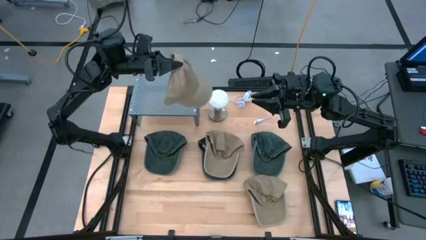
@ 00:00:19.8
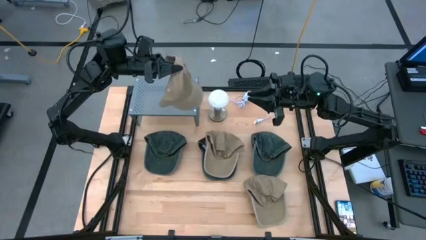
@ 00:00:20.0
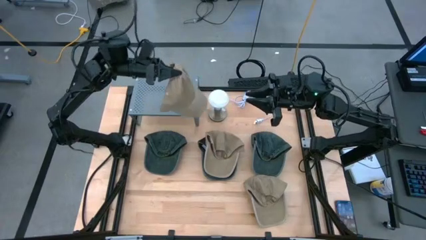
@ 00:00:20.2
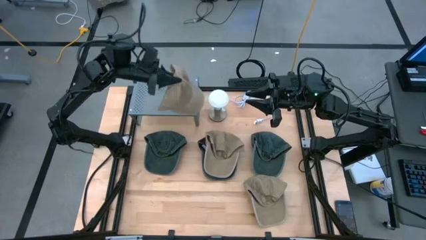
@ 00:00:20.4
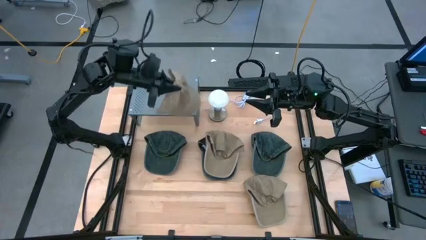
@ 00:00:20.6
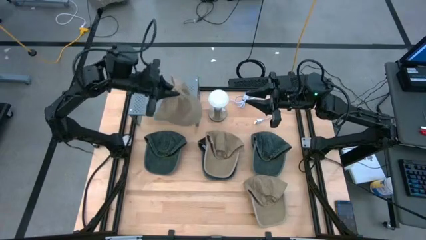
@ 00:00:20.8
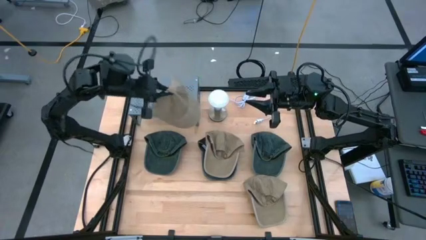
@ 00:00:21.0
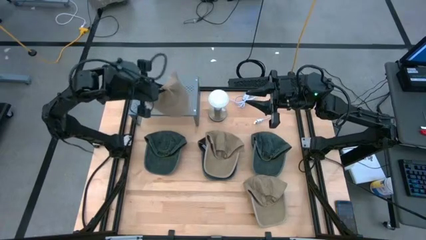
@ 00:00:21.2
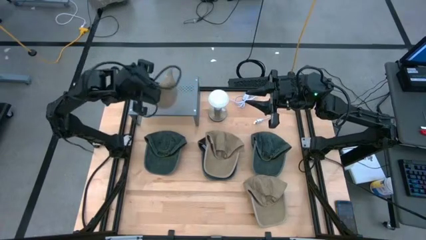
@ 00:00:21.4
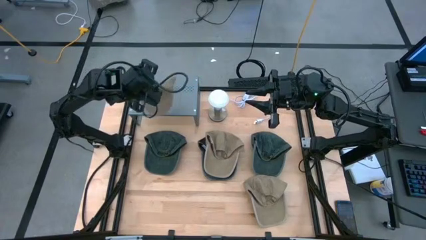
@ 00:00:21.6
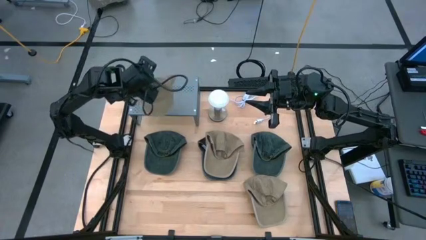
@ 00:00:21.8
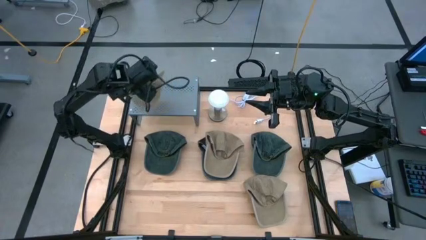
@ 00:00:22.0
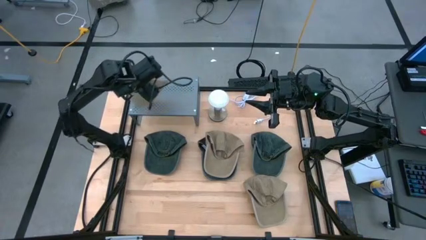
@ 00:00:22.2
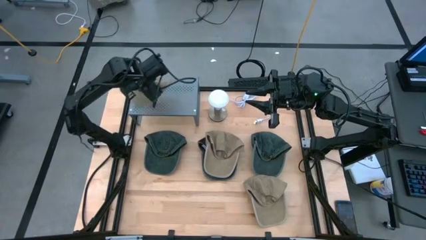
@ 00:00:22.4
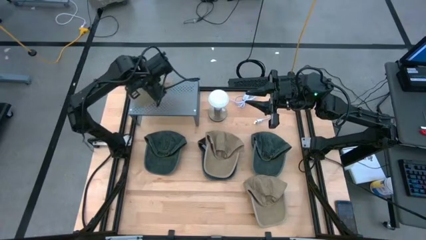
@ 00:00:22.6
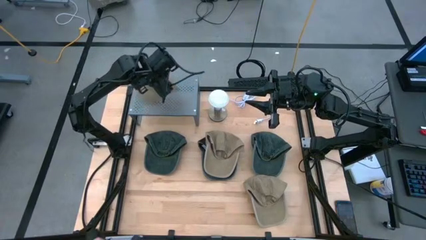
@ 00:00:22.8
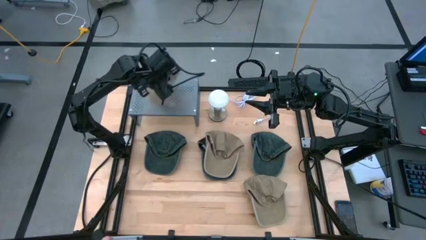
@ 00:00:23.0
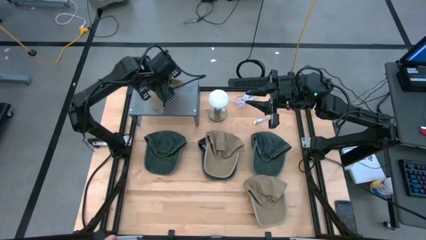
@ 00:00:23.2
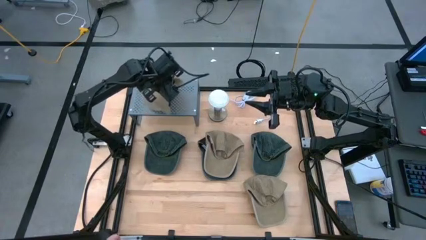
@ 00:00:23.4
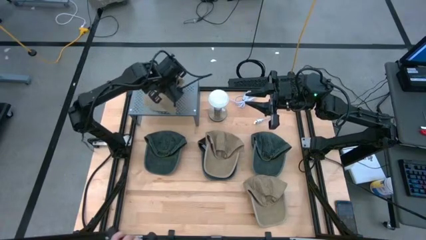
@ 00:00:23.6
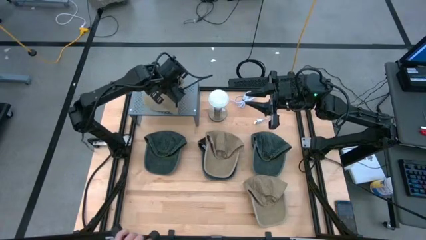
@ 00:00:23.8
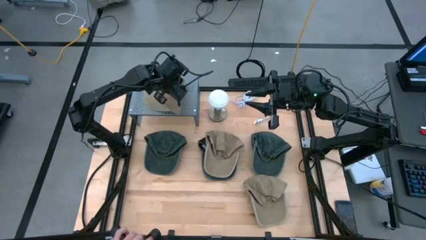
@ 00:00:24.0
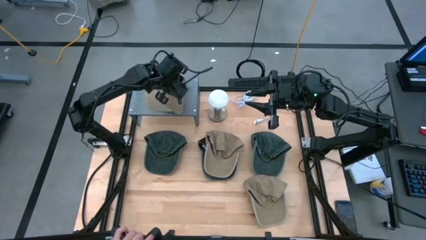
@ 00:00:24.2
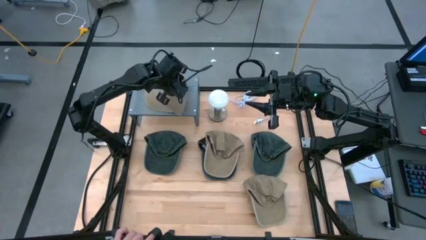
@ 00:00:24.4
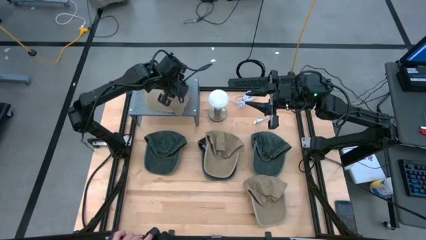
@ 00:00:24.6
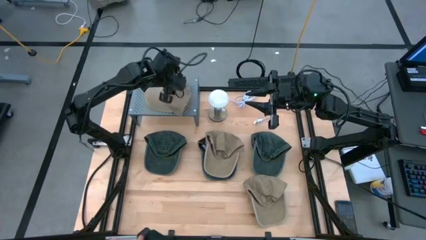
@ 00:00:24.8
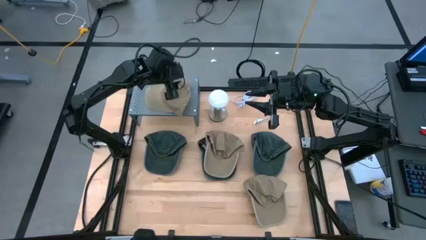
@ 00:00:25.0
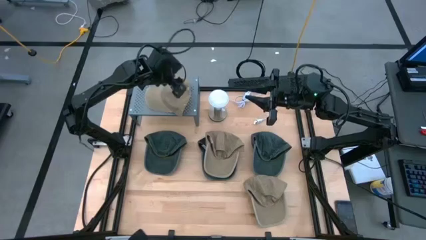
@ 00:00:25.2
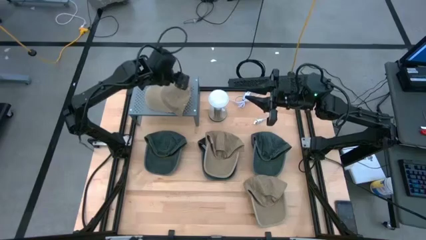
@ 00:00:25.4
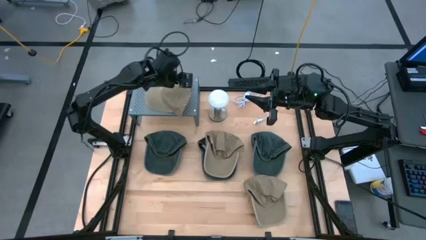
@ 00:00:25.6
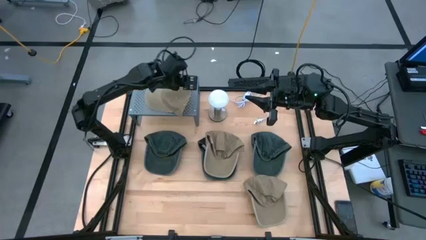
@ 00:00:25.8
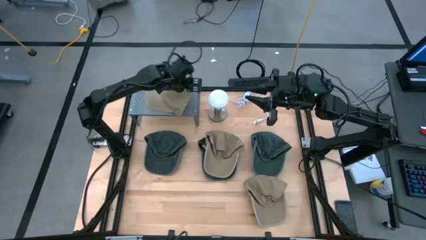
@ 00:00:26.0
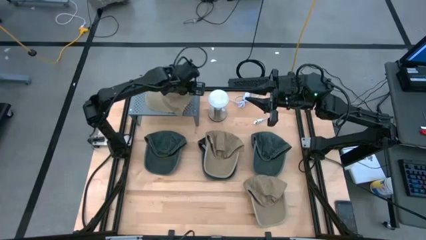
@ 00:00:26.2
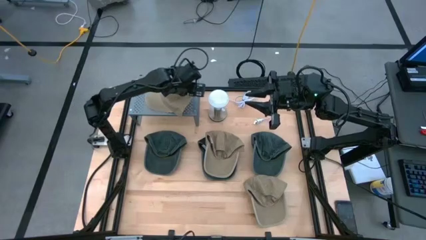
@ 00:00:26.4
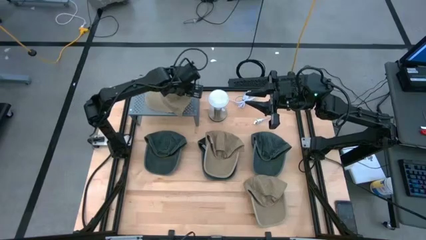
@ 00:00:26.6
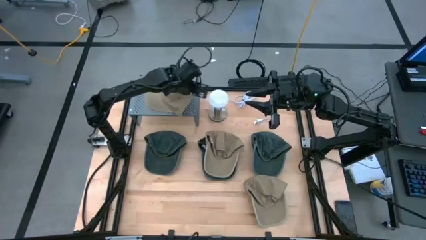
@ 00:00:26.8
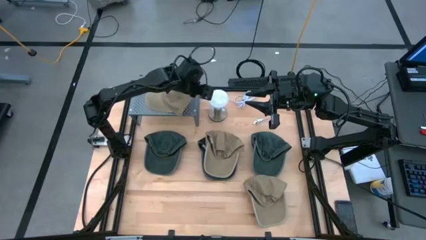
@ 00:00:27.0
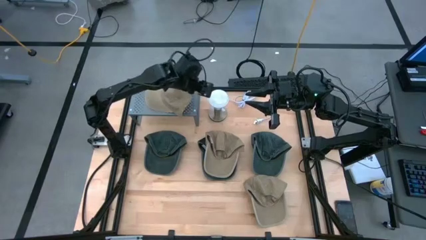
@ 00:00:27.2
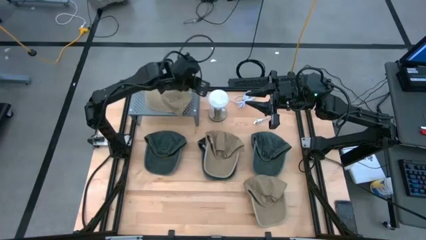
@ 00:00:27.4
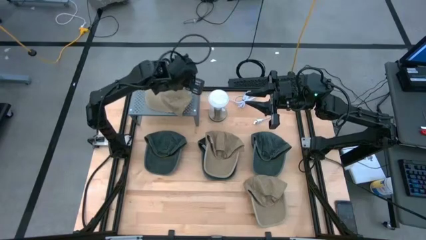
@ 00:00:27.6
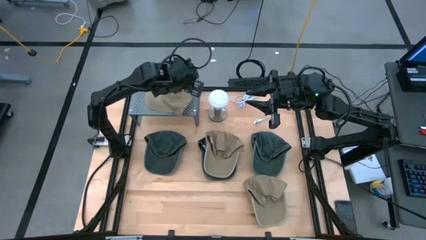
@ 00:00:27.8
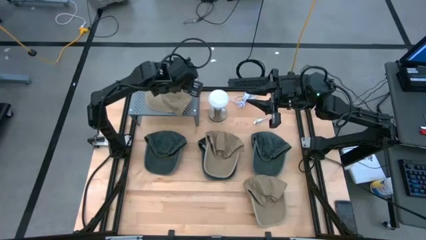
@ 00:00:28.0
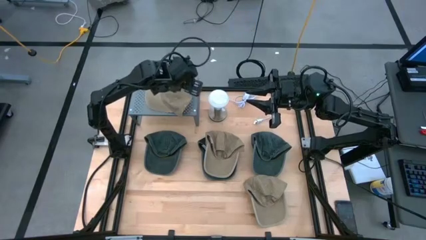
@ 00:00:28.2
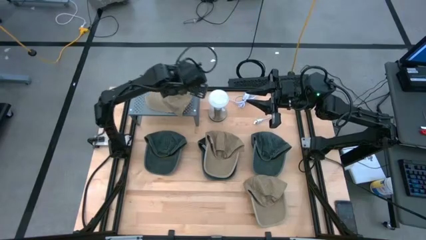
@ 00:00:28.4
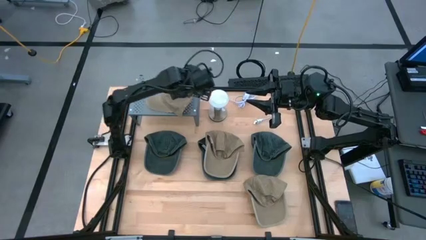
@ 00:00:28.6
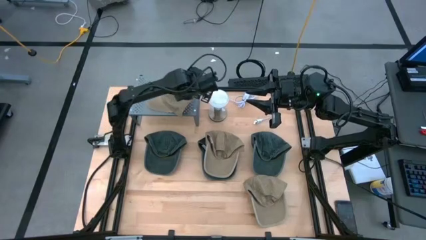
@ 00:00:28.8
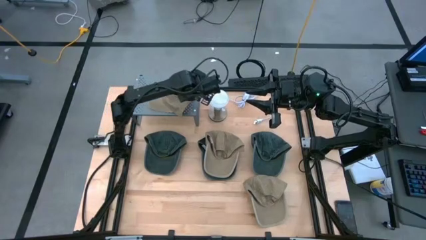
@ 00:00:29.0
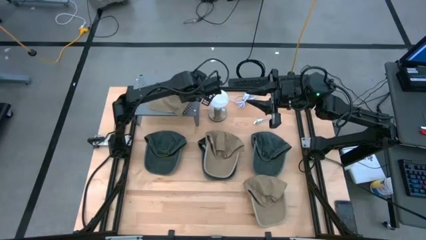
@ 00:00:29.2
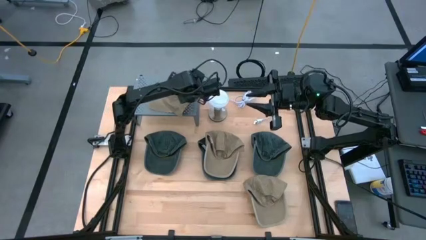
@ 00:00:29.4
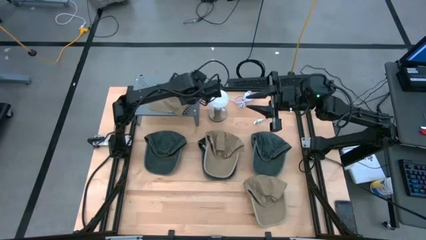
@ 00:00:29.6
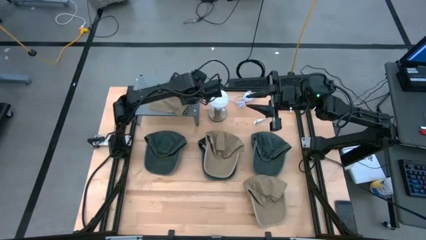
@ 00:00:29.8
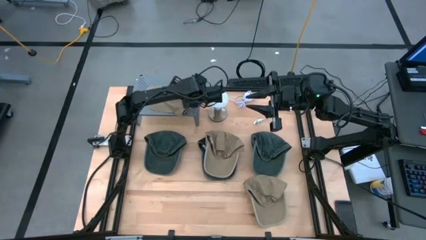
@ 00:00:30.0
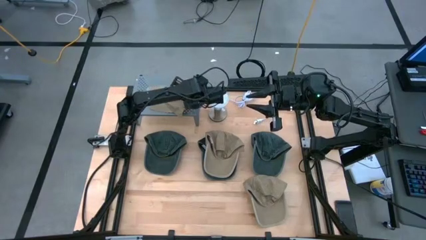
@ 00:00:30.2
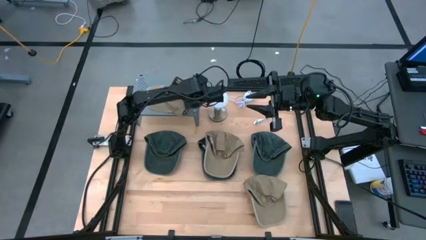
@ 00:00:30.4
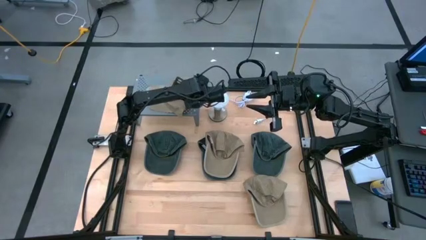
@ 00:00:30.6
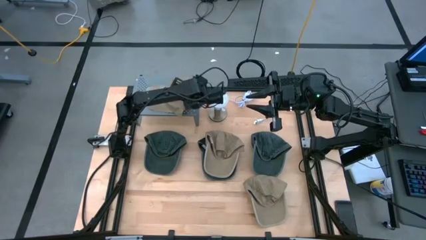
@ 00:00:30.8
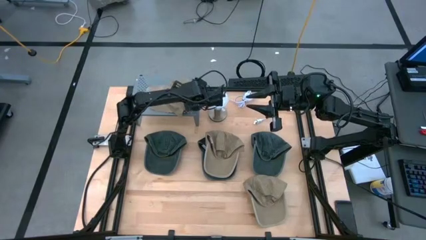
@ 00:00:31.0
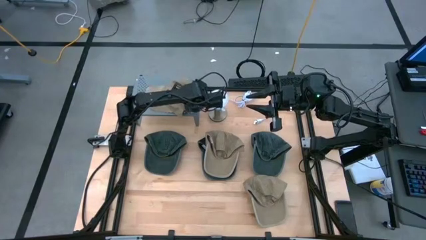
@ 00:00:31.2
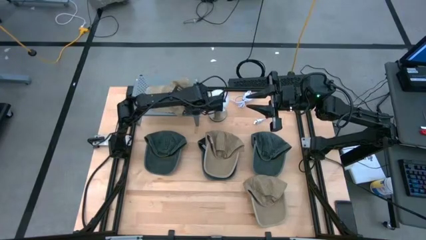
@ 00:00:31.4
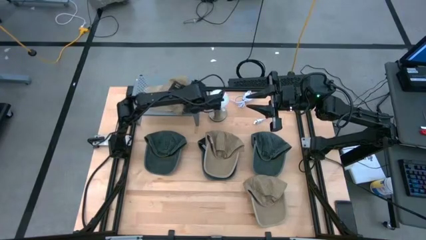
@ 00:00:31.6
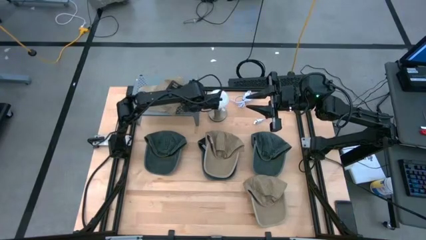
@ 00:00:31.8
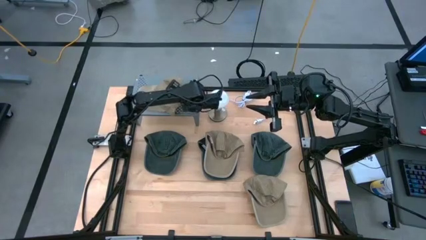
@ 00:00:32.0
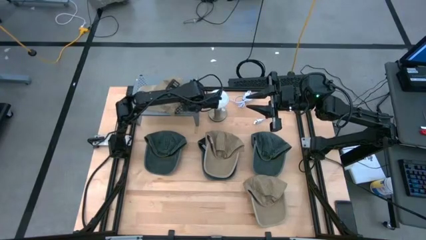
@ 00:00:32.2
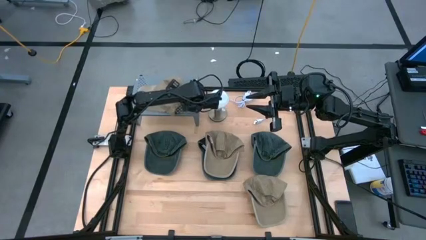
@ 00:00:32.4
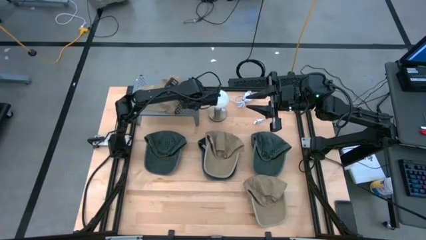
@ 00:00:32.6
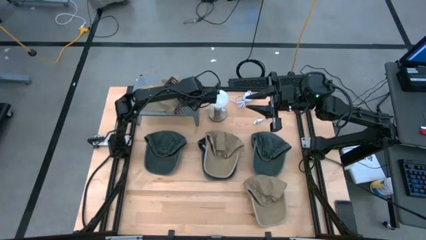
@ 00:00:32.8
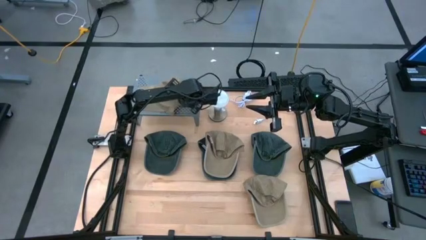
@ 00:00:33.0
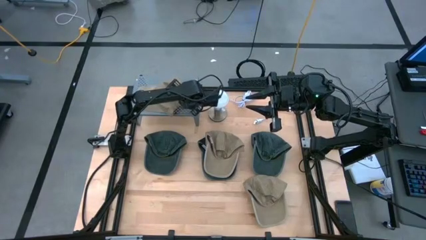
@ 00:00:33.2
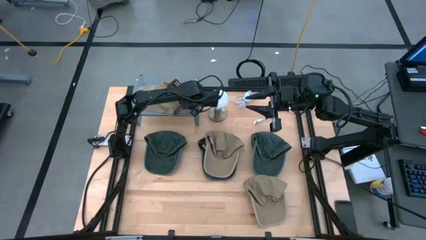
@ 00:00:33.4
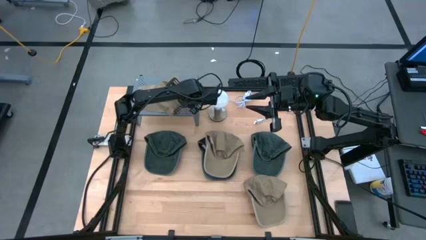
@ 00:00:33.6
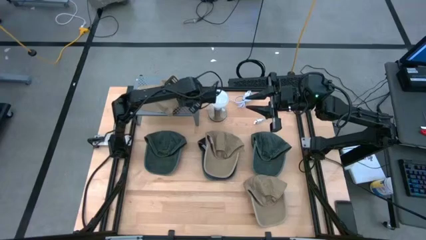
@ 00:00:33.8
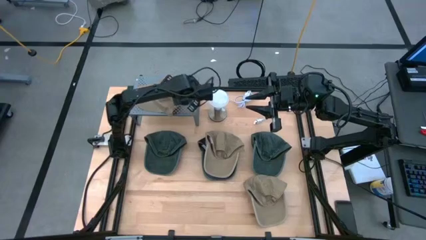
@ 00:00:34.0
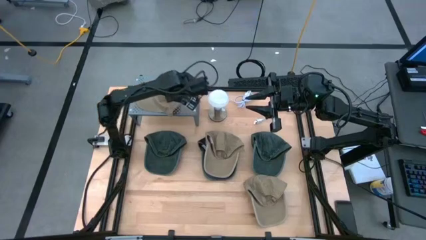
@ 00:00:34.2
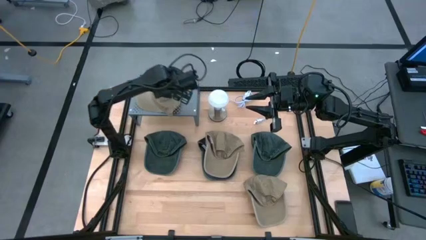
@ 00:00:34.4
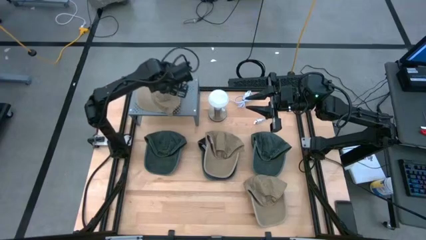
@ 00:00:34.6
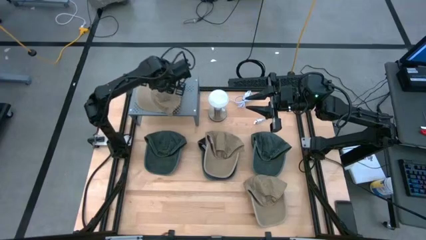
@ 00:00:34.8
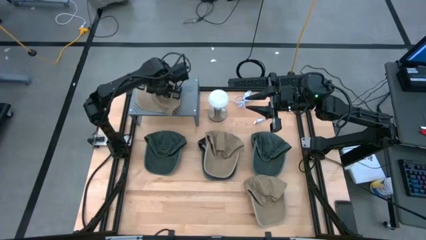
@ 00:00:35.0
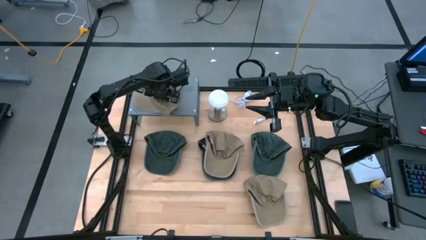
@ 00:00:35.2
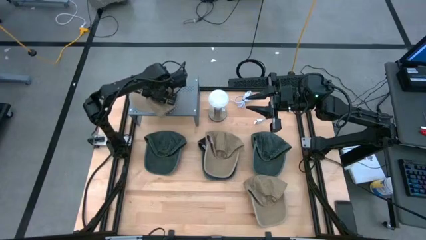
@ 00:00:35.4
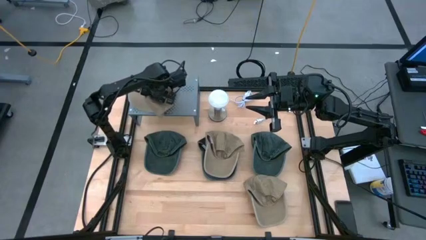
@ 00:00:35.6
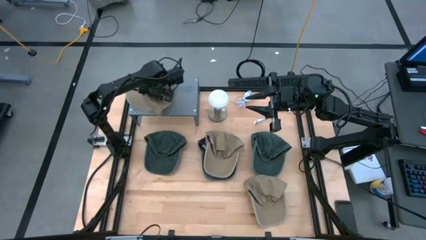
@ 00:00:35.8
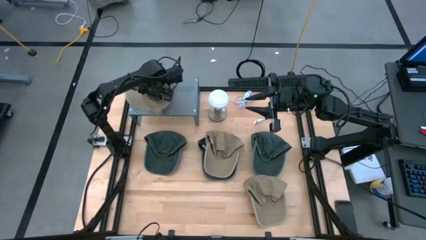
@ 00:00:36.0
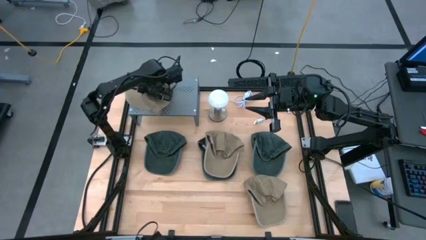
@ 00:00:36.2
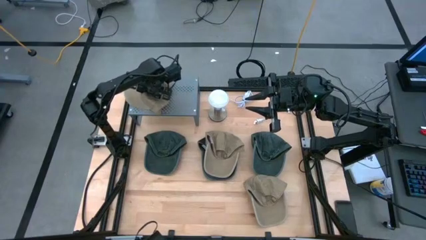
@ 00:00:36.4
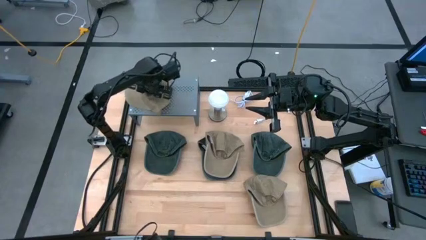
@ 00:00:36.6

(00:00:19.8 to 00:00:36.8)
Task: Pick & Place hat
Put the left brown cap on the shelf
